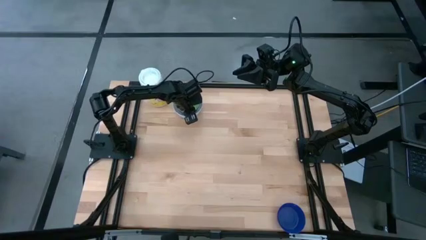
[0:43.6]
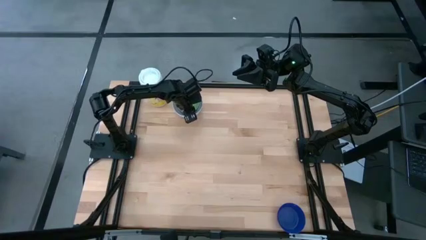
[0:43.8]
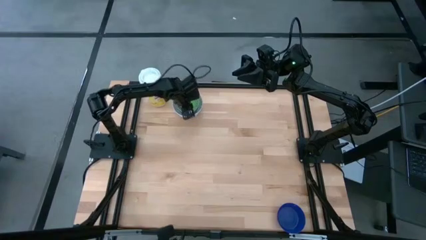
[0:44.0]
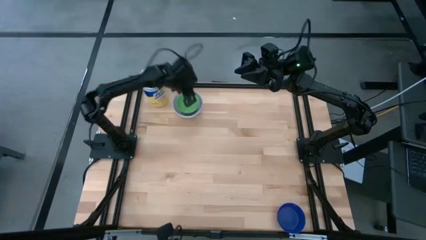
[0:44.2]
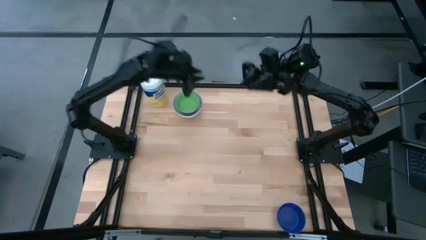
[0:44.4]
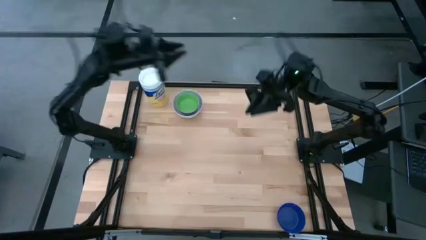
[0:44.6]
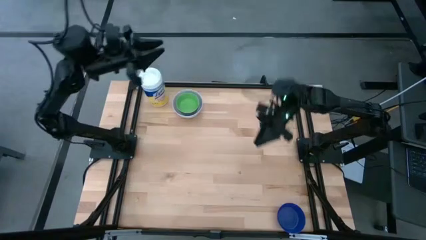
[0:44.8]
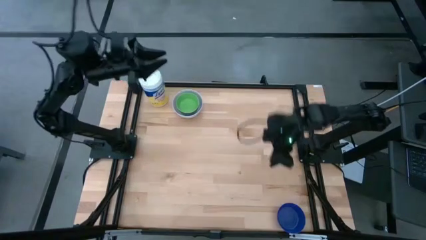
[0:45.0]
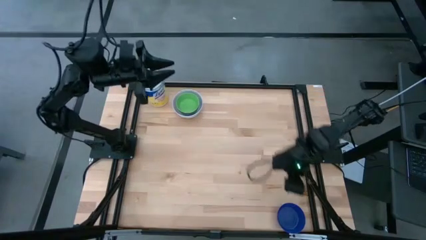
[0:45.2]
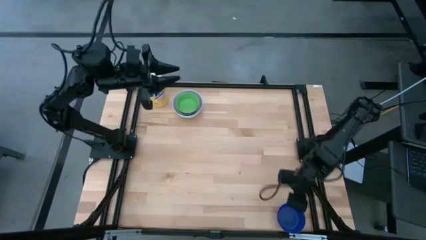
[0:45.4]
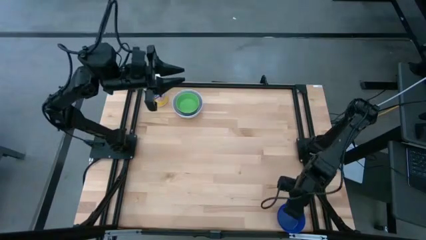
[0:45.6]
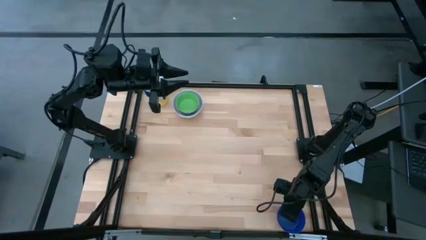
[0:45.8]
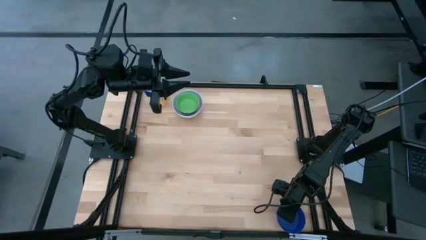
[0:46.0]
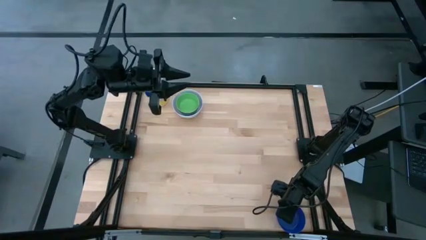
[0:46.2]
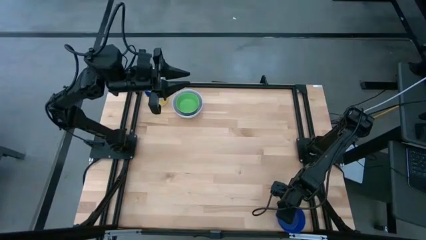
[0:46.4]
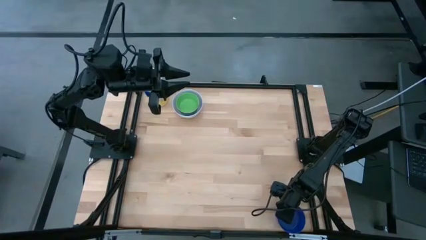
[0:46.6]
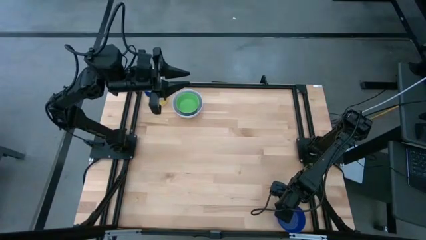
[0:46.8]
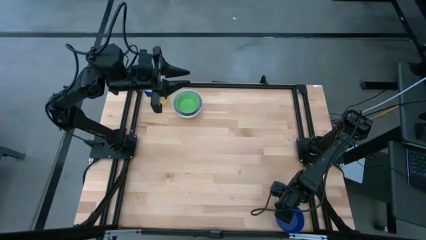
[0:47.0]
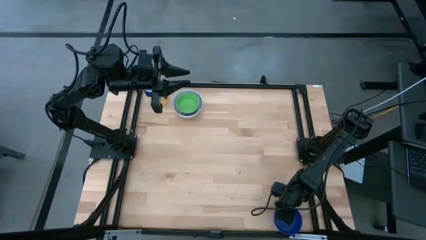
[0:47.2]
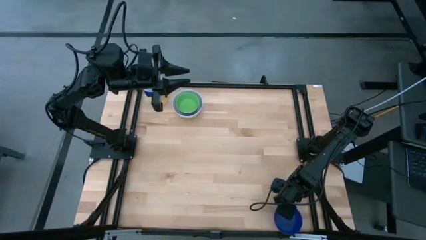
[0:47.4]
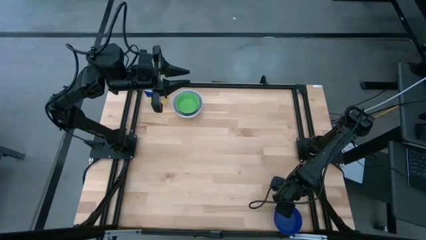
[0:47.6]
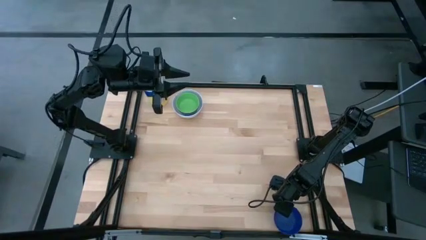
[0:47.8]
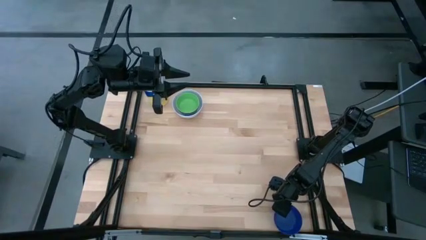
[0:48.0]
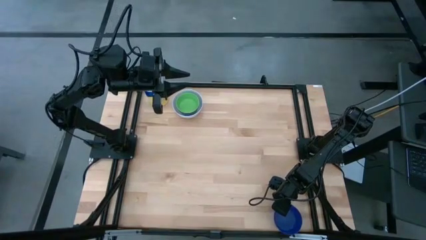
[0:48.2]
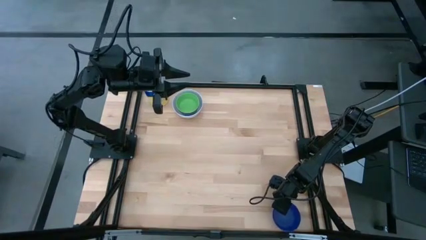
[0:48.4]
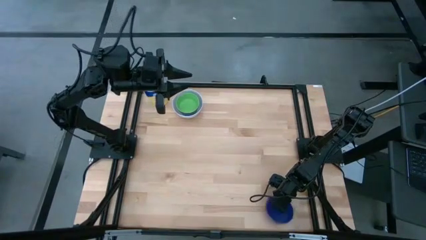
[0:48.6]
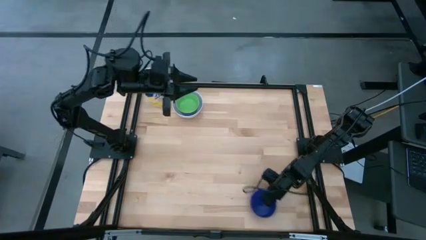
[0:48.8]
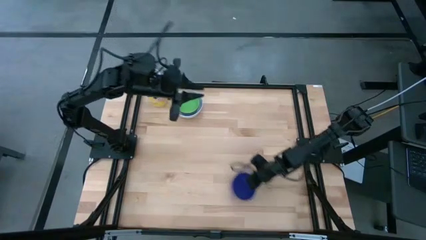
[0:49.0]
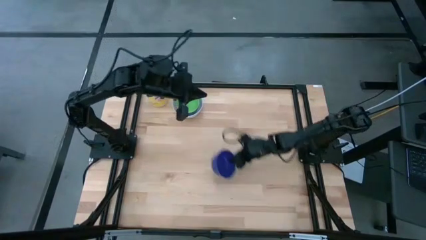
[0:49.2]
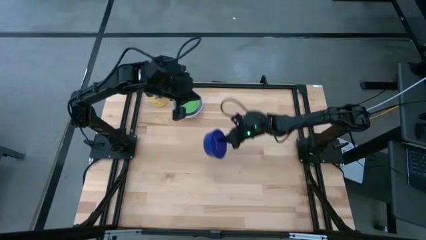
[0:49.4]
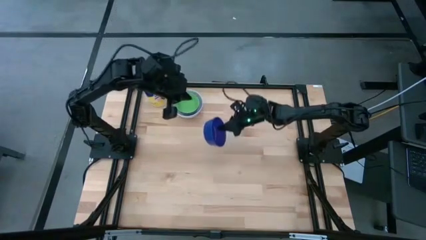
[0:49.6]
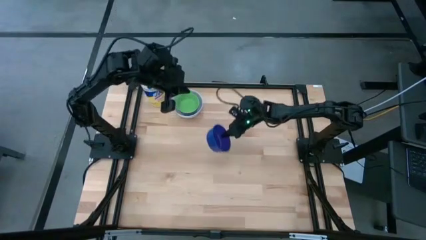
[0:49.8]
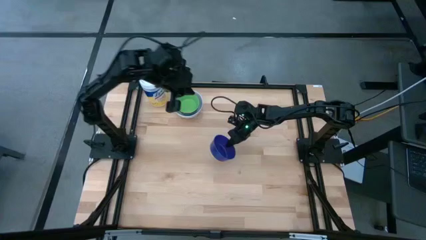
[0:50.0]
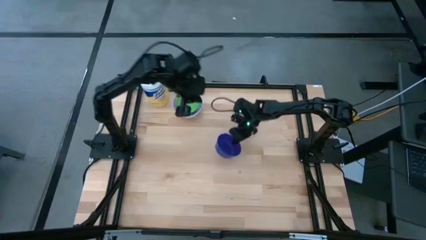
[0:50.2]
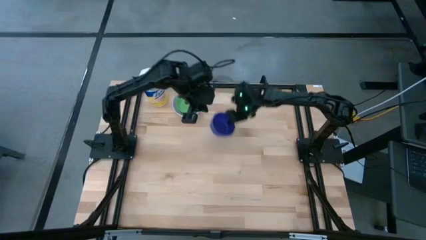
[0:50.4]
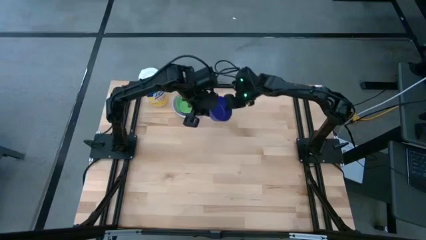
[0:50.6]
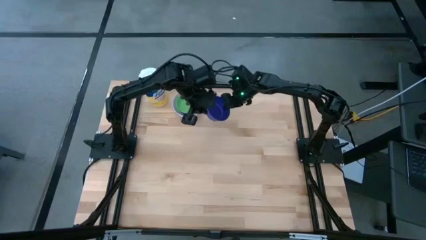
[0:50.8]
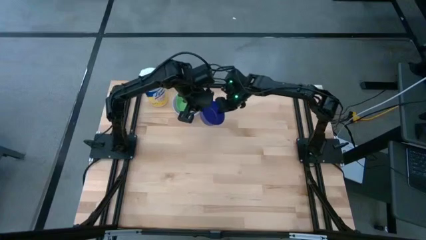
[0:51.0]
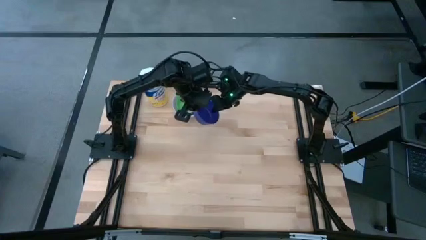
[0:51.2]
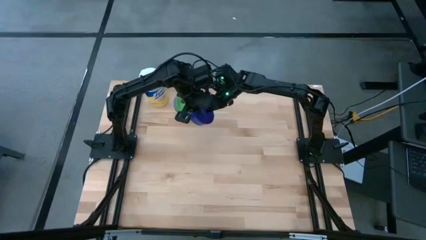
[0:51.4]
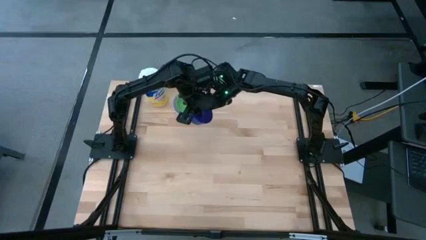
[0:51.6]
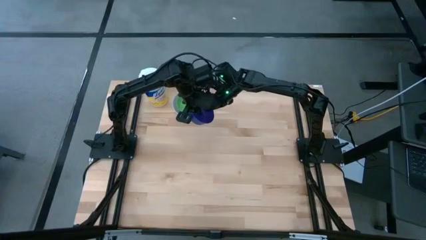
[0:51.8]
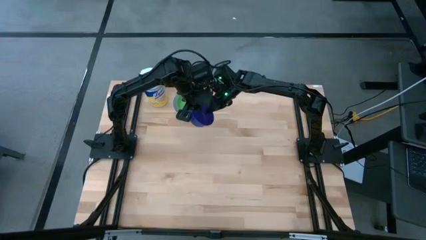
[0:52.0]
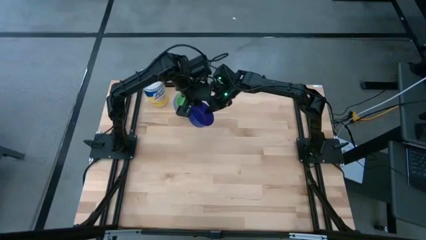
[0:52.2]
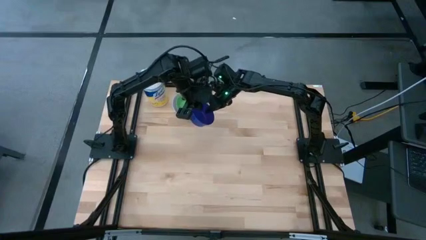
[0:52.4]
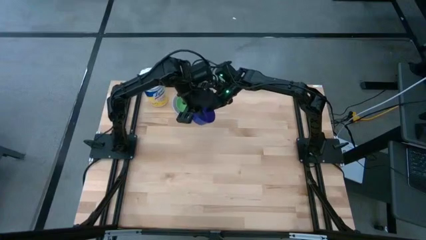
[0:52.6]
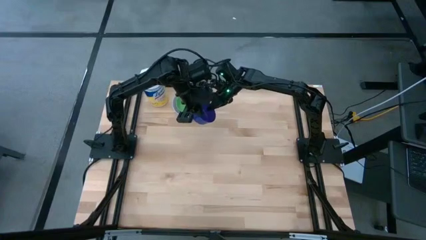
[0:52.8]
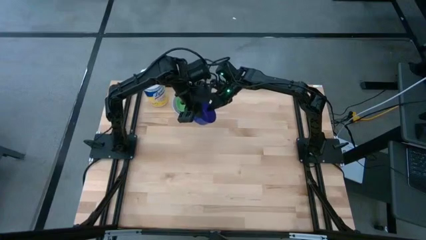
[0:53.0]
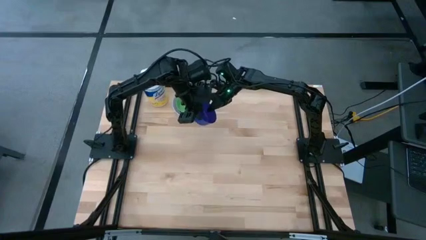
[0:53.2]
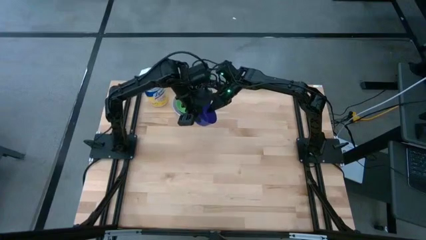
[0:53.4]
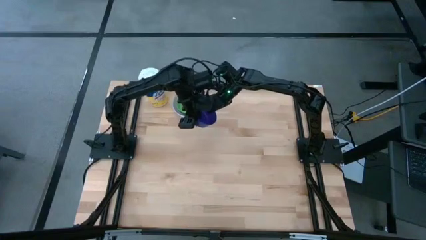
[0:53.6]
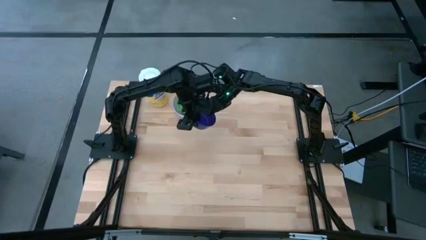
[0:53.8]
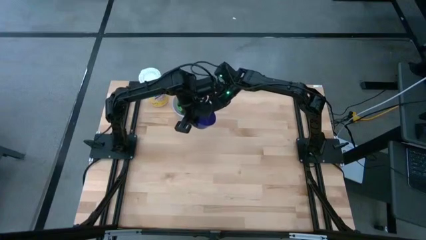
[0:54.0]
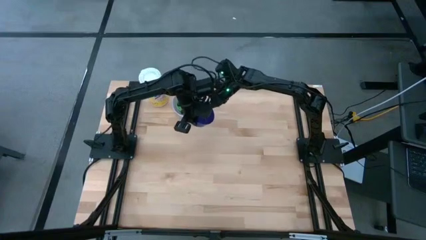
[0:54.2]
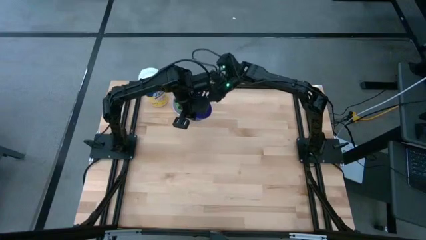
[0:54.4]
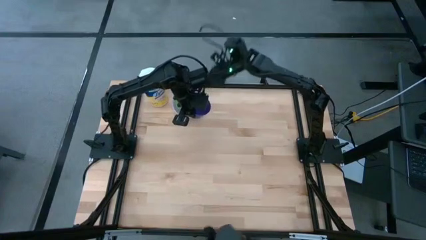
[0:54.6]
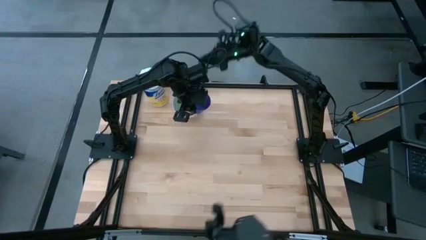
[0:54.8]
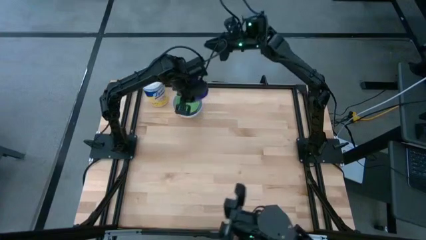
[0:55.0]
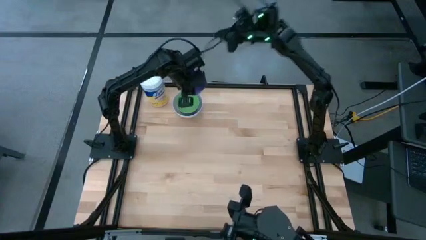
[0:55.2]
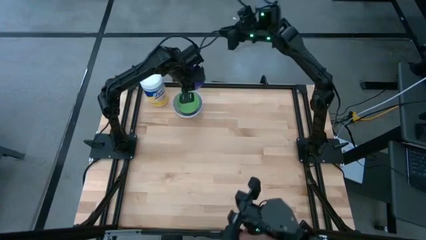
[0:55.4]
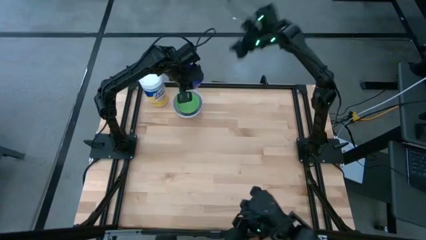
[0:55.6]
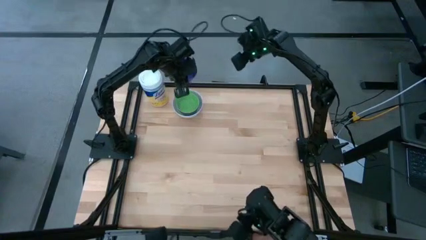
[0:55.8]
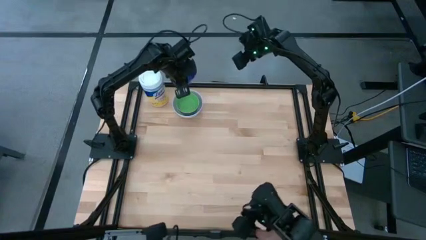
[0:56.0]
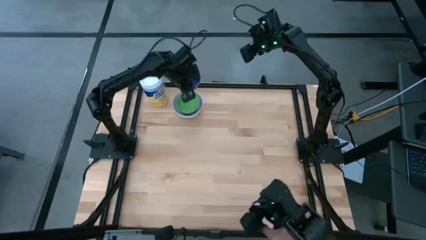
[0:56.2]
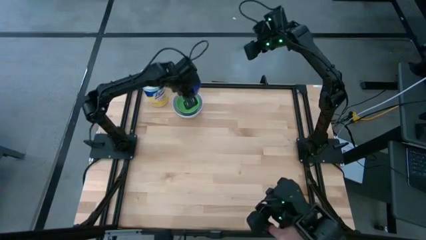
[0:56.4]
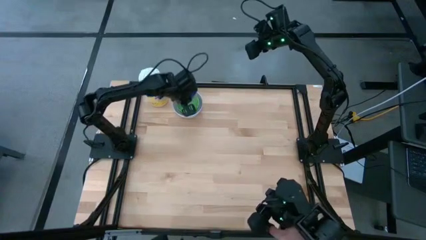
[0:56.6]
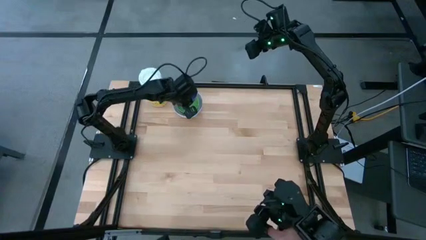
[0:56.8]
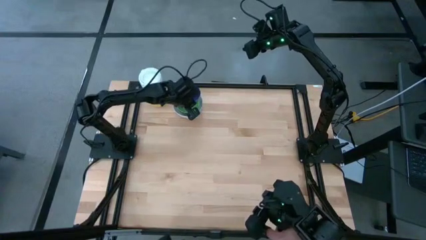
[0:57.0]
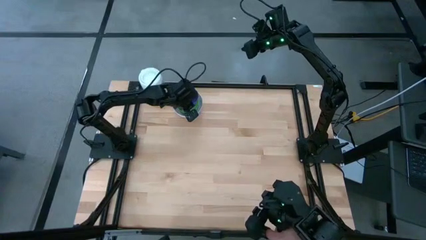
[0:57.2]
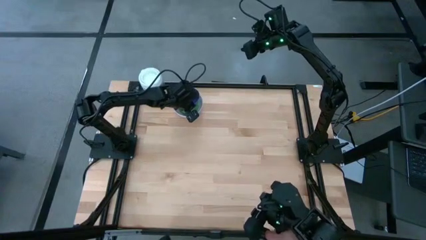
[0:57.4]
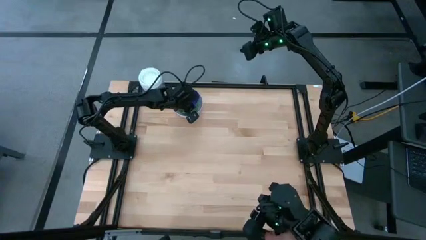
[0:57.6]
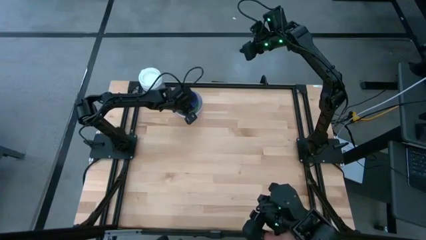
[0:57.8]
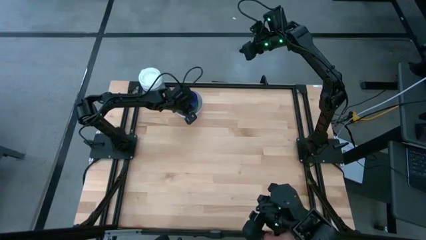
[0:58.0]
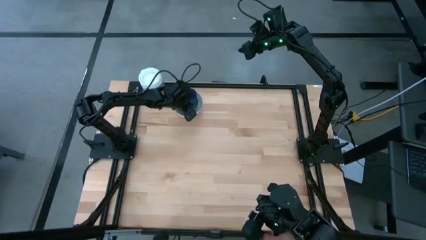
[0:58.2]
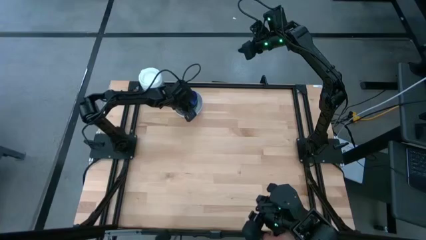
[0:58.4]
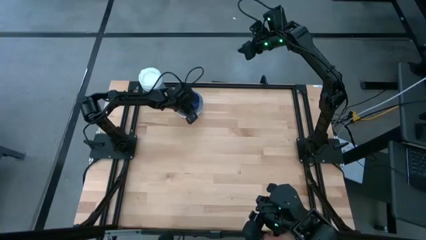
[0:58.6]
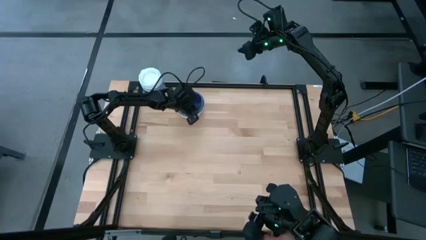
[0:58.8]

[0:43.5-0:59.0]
Stack the dark blue bowl on top of the green bowl
